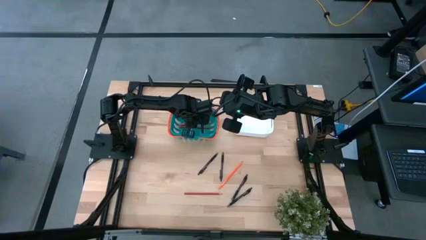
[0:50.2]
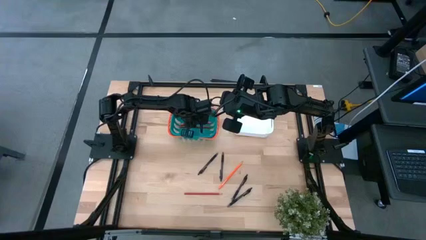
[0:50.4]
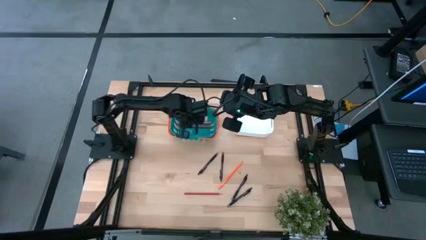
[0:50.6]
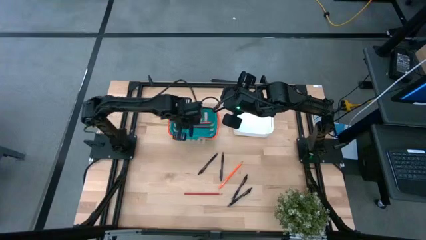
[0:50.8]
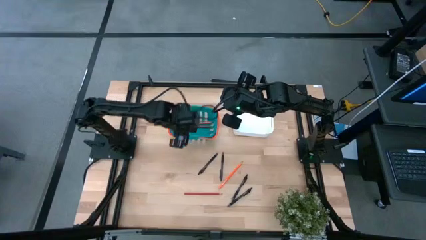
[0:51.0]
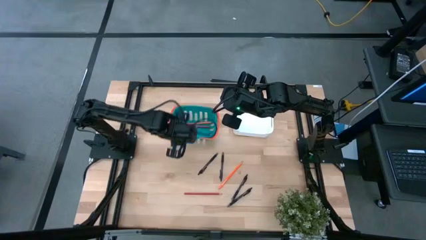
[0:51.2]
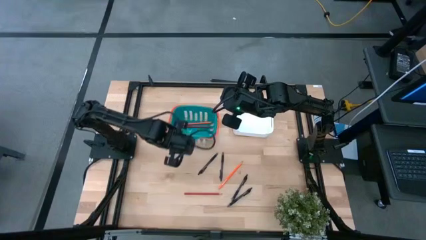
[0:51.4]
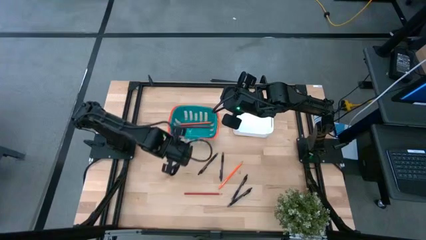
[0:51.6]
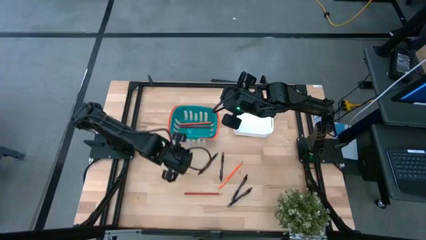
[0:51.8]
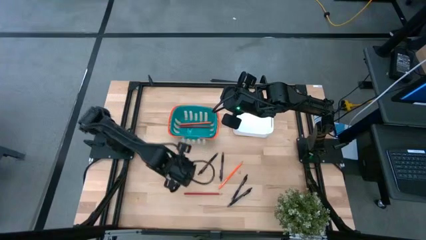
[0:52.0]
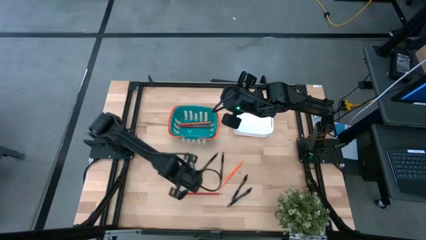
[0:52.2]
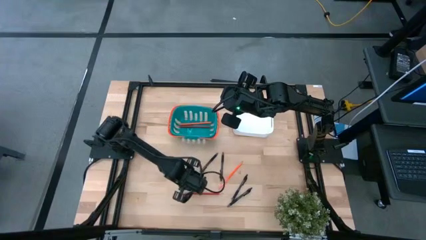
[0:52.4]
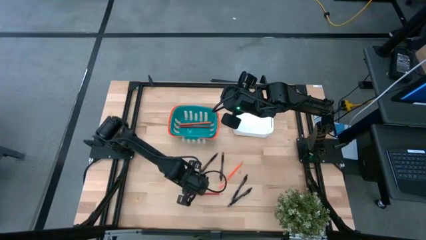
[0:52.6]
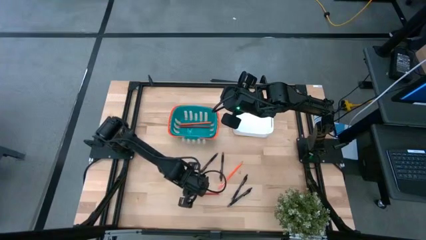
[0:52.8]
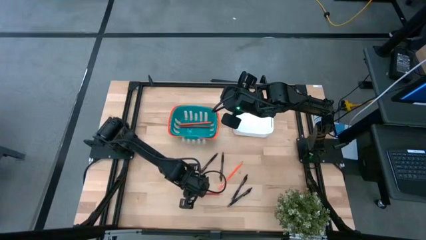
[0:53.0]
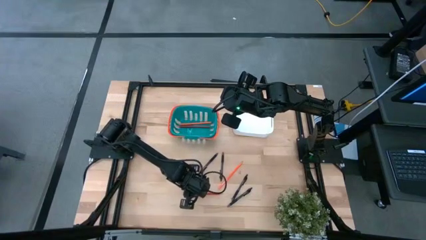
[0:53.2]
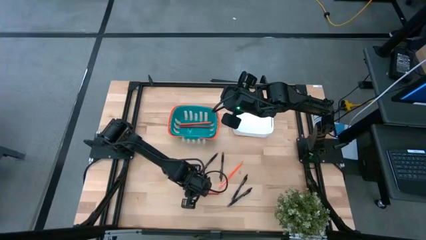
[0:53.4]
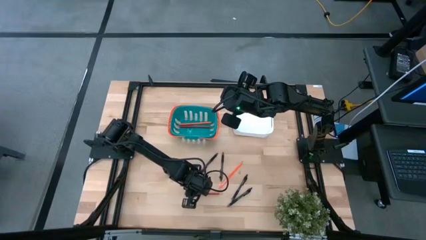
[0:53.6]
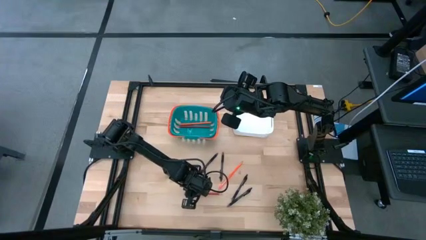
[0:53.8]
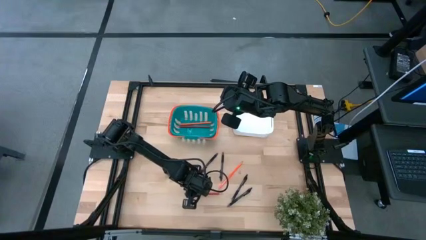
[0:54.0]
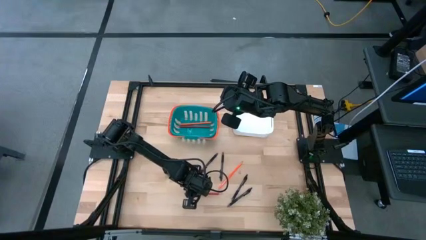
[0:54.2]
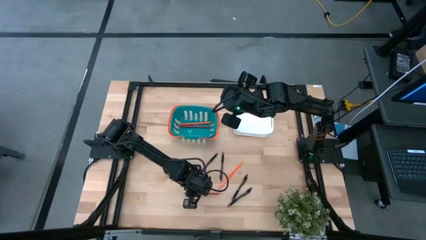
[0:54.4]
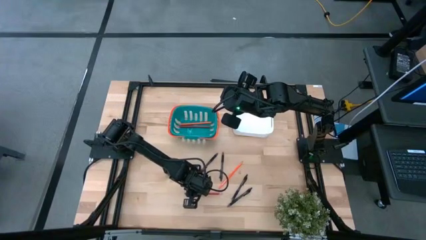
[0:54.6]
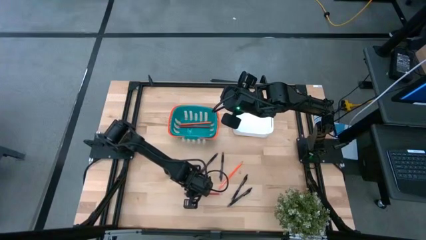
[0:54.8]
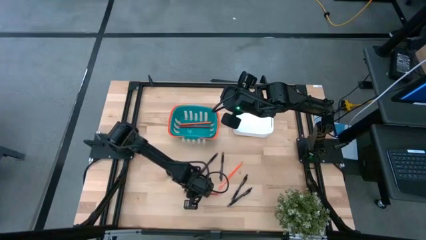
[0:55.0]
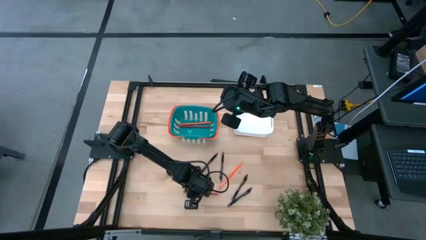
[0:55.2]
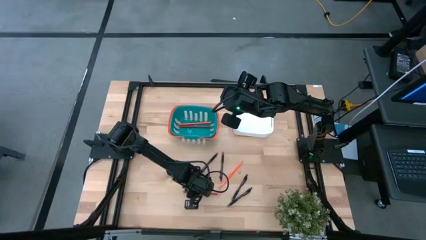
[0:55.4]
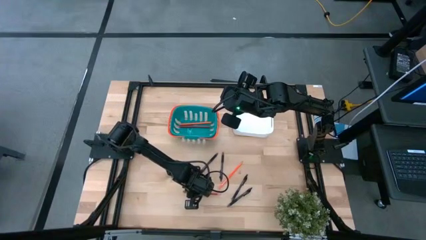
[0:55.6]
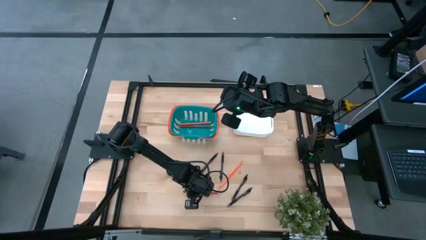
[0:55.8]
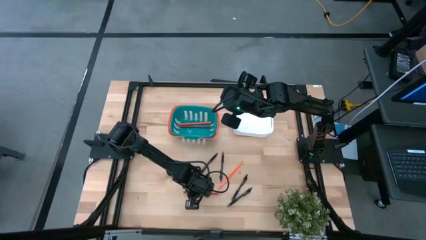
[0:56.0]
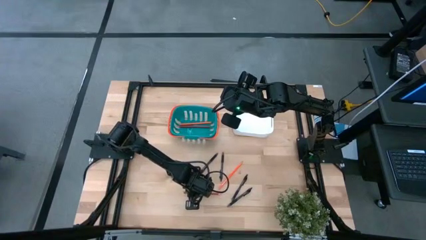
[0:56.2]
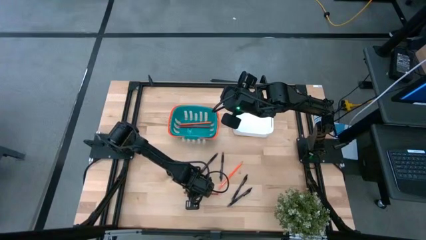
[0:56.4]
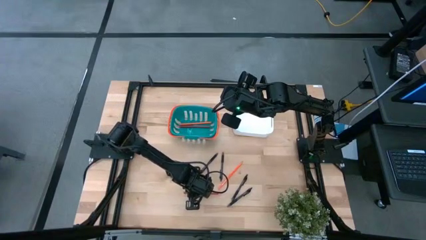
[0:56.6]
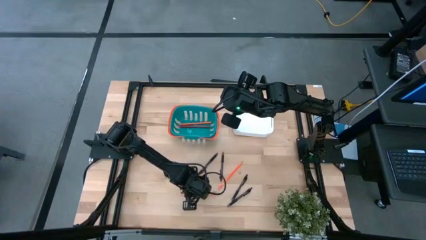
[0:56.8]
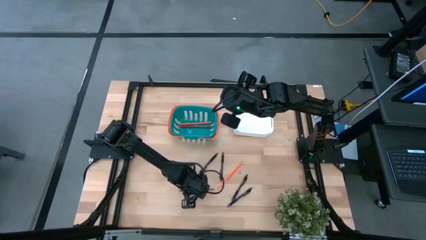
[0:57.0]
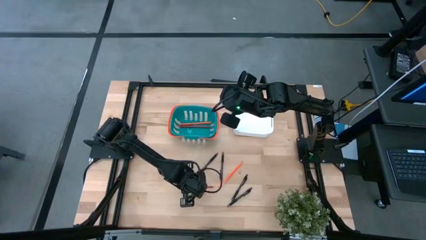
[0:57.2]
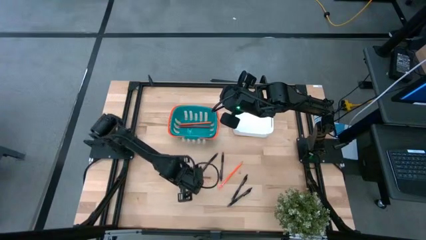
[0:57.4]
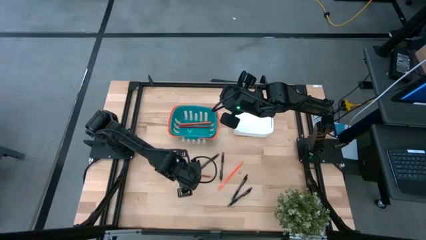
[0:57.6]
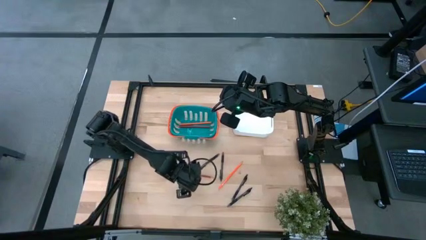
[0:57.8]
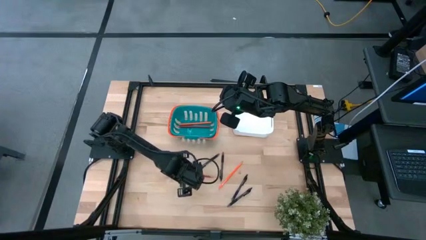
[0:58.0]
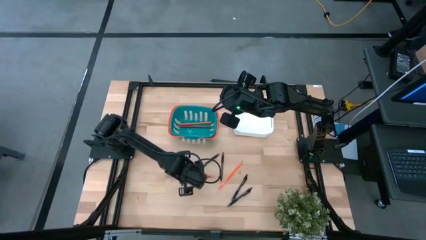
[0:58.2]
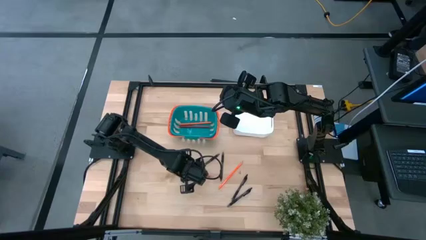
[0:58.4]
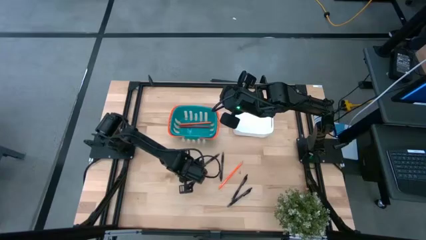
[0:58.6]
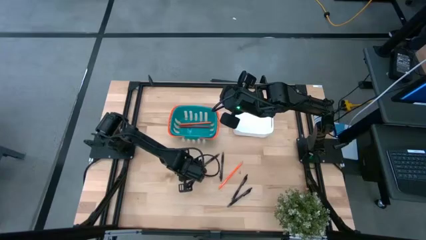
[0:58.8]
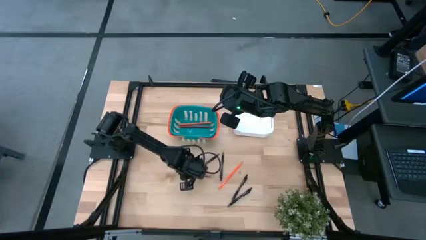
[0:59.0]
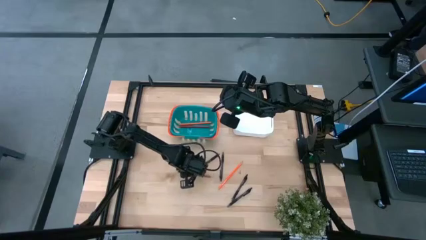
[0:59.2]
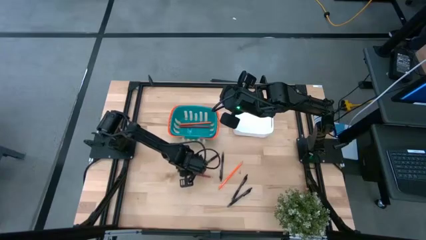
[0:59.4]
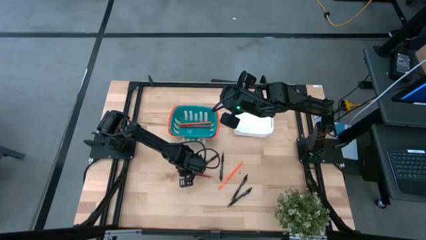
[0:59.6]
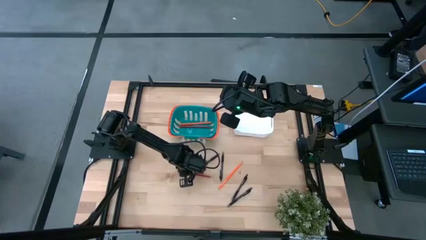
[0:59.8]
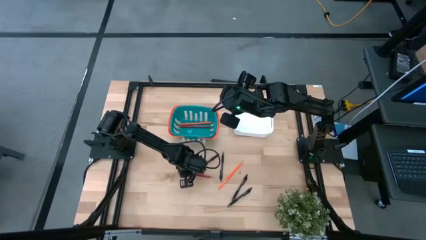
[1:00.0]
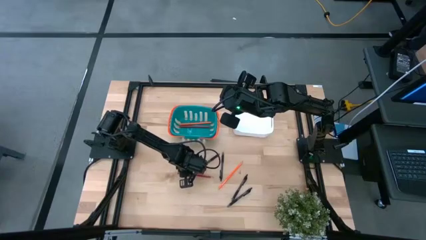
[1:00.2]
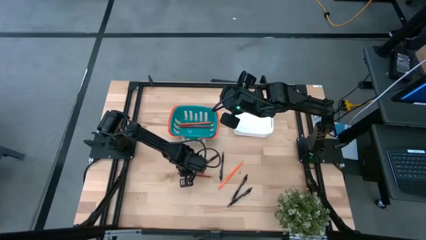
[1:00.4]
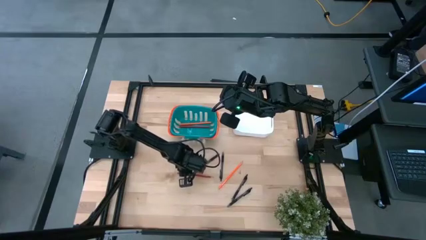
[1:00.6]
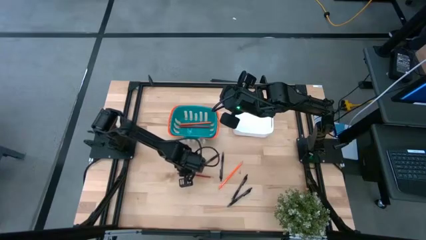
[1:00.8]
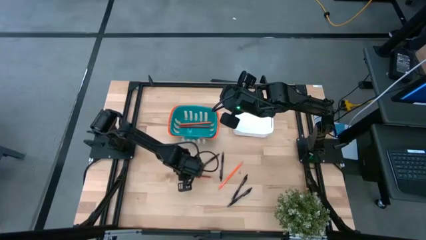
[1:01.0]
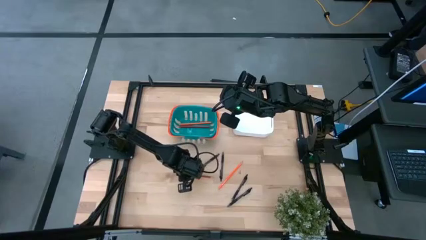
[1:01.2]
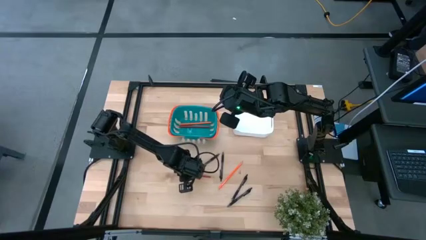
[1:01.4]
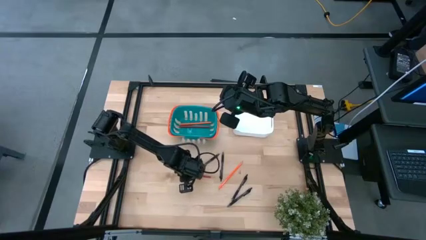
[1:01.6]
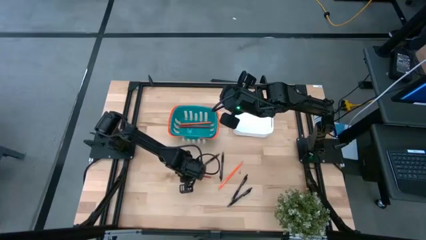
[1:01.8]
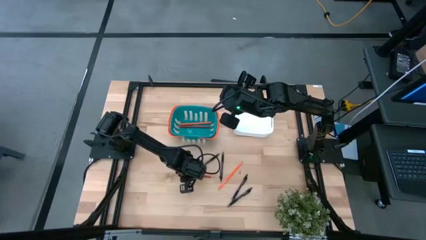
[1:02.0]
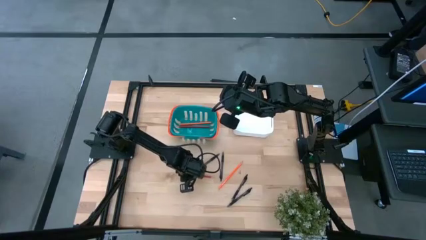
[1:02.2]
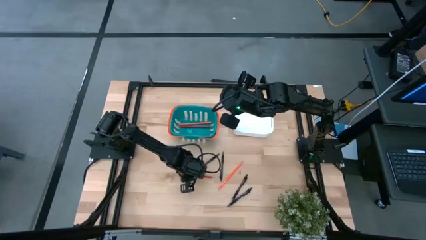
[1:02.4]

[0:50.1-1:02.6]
Task: Sort pens & pencils
Put the red pencil into the blue bin

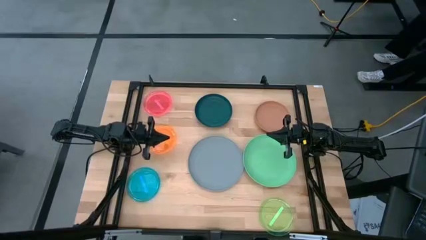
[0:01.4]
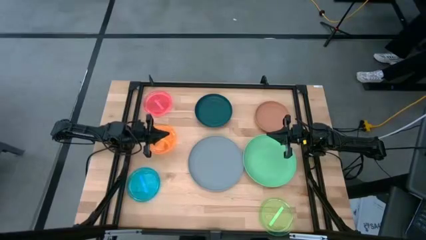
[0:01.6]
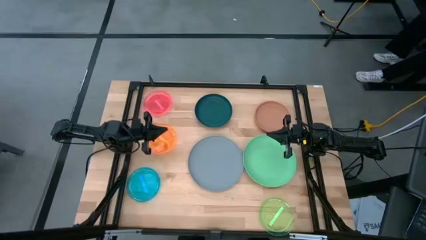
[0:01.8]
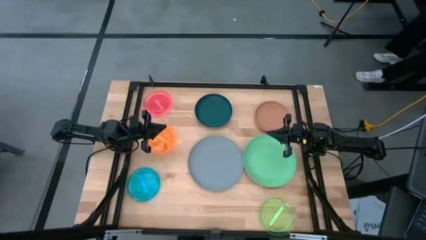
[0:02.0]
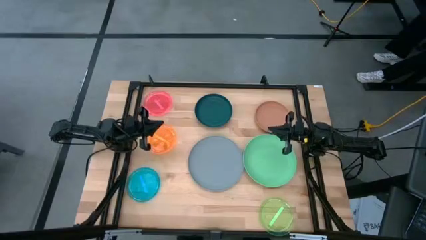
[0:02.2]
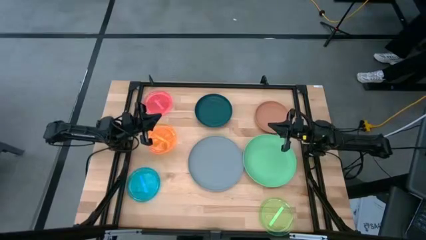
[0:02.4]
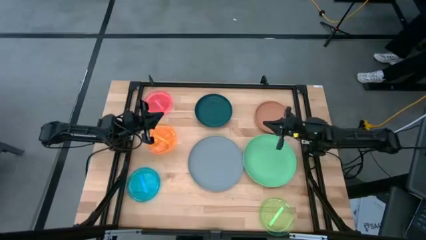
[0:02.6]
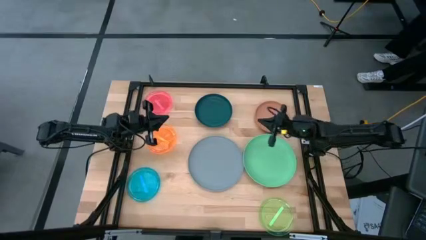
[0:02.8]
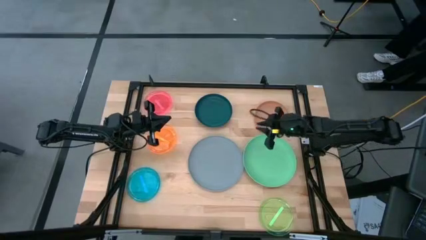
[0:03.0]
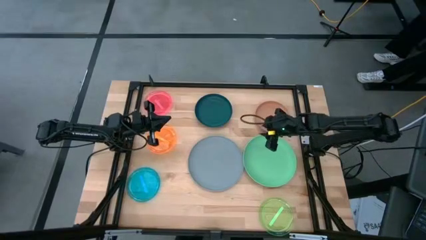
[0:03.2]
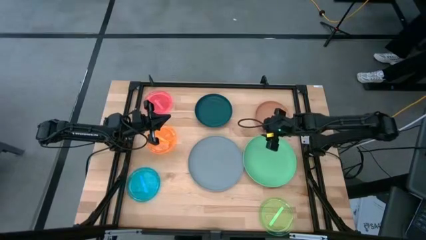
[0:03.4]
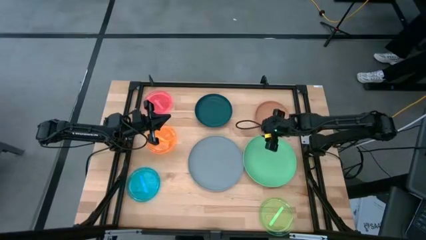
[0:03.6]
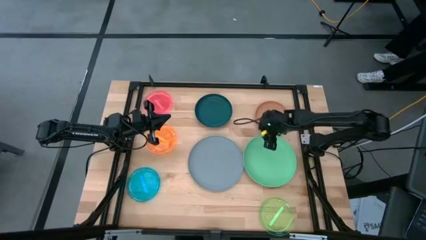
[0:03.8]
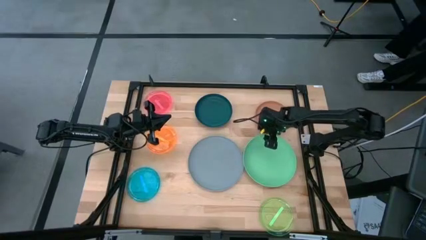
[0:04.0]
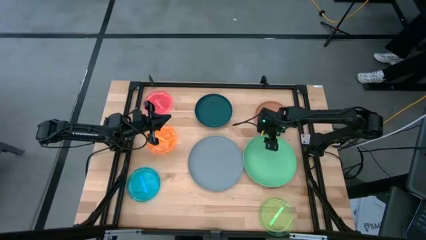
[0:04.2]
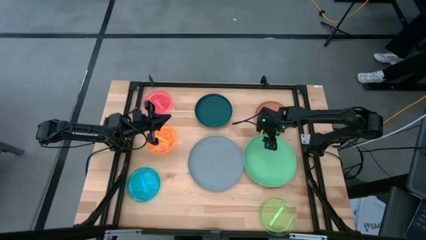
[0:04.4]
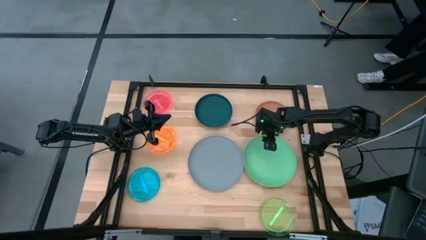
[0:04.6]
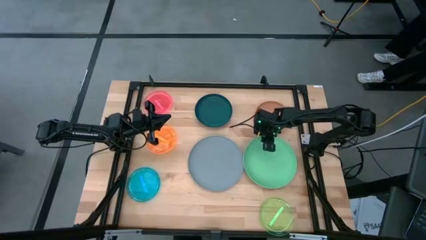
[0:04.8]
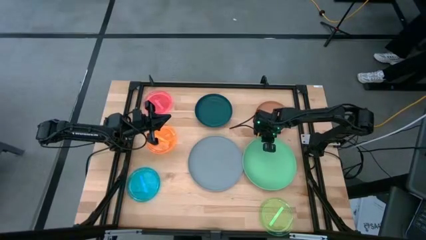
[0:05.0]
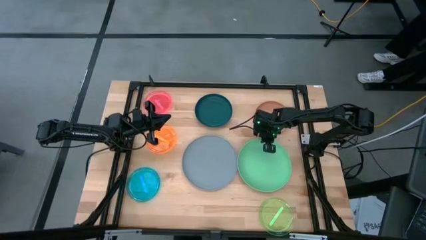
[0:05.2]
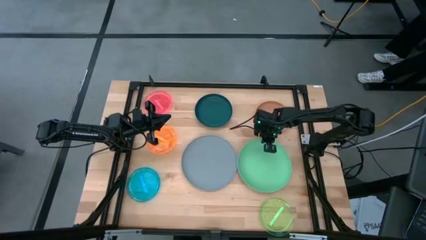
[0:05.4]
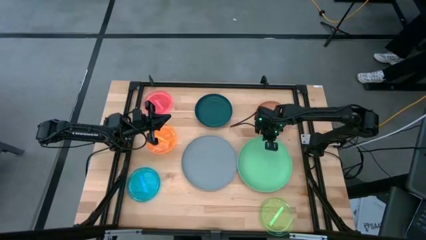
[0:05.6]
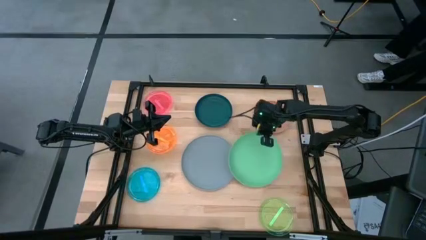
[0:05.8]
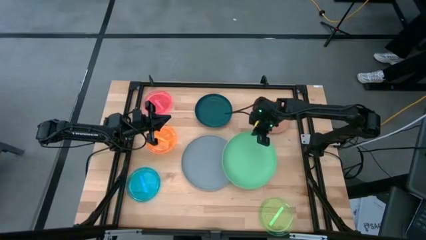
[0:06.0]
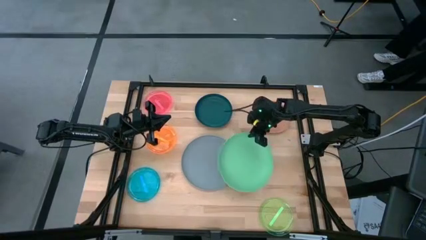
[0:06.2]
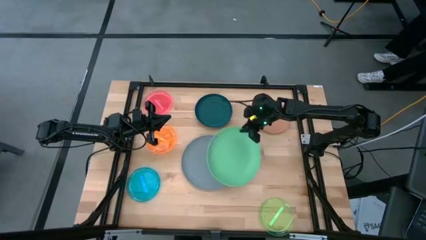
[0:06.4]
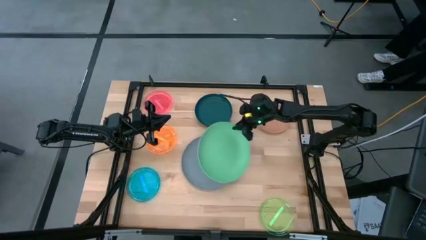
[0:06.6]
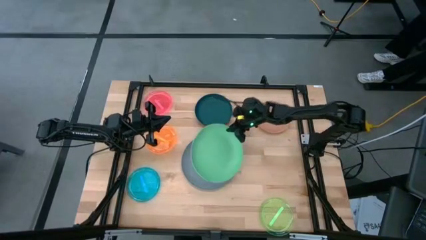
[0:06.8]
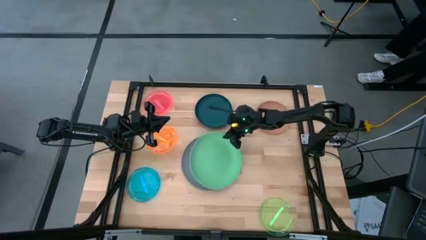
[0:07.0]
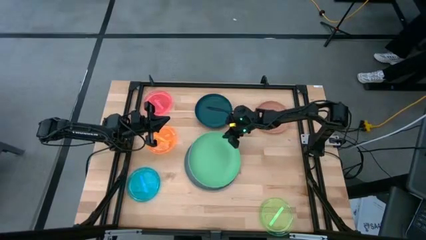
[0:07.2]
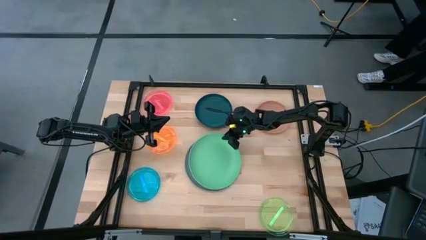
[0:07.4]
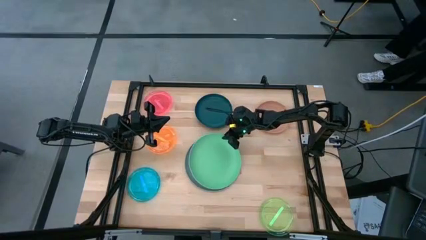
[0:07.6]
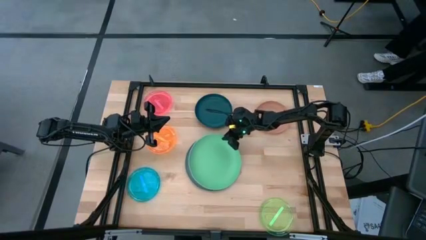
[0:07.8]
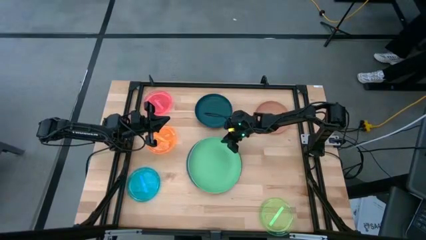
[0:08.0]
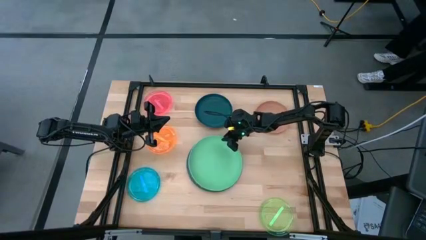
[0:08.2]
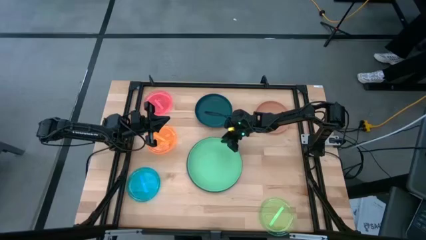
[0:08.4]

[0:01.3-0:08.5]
Task: Stack plastic plates
Stack the green plate on top of the gray plate
